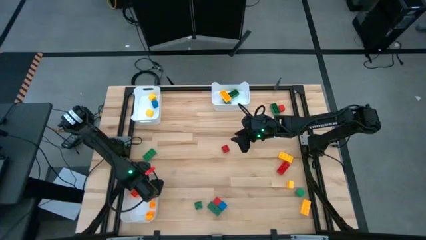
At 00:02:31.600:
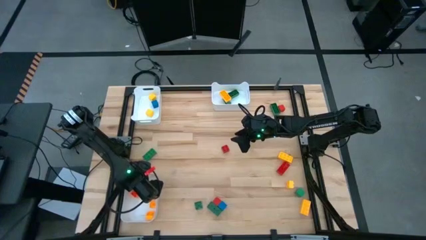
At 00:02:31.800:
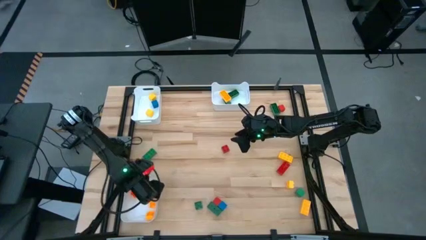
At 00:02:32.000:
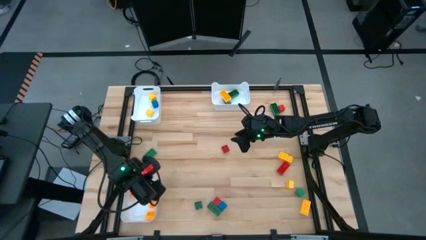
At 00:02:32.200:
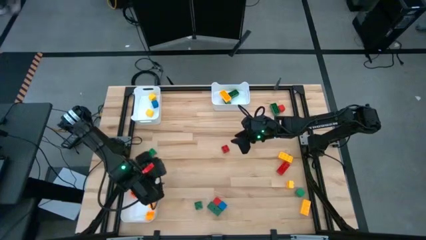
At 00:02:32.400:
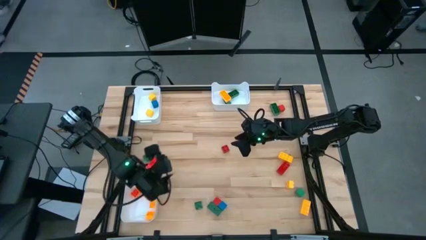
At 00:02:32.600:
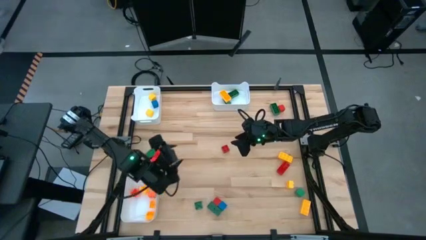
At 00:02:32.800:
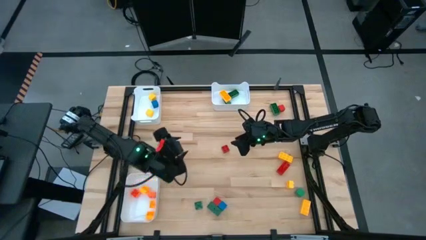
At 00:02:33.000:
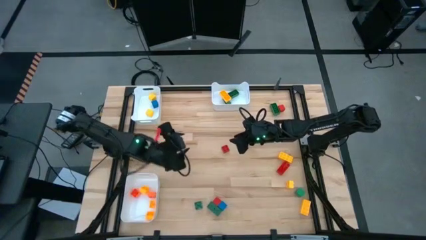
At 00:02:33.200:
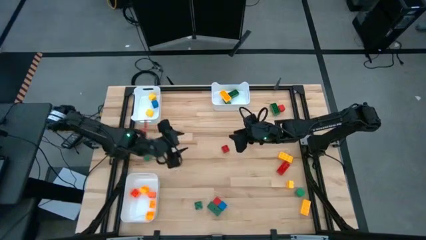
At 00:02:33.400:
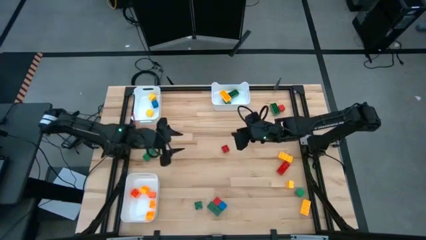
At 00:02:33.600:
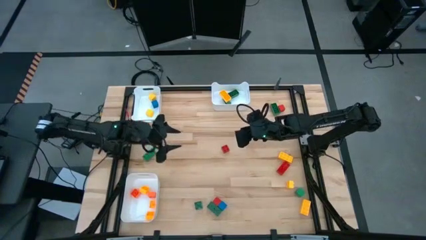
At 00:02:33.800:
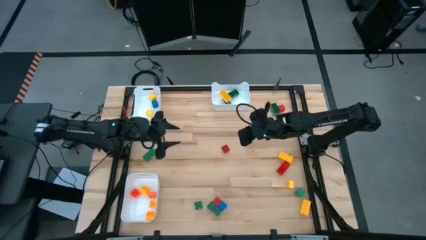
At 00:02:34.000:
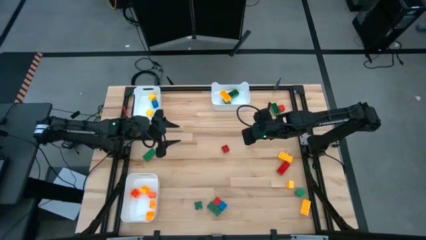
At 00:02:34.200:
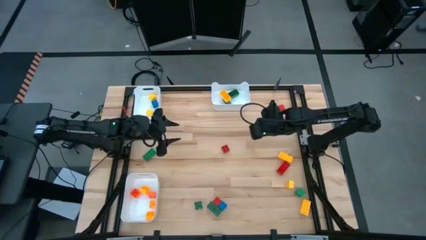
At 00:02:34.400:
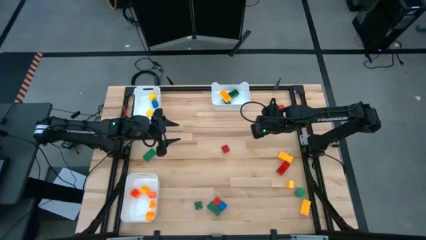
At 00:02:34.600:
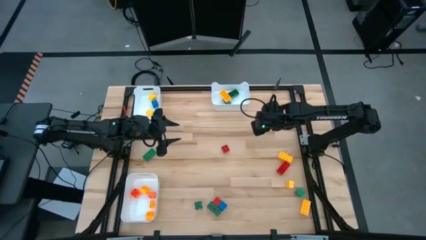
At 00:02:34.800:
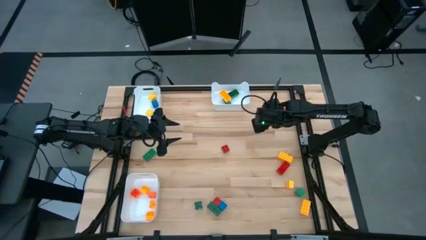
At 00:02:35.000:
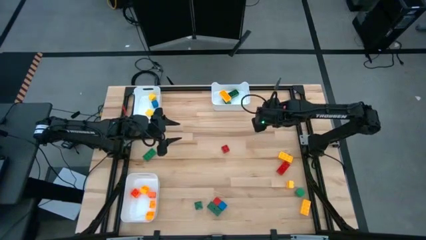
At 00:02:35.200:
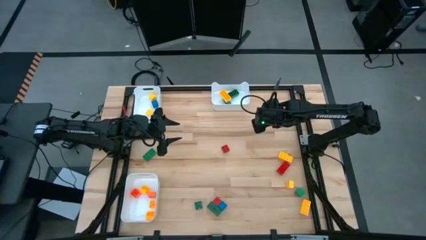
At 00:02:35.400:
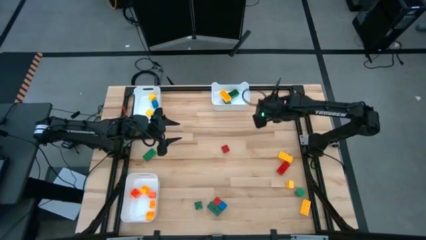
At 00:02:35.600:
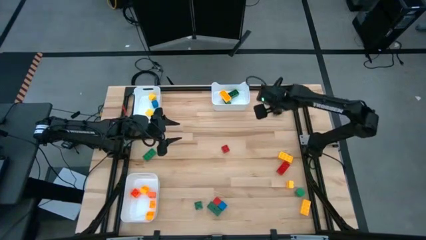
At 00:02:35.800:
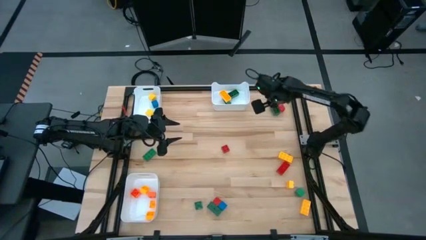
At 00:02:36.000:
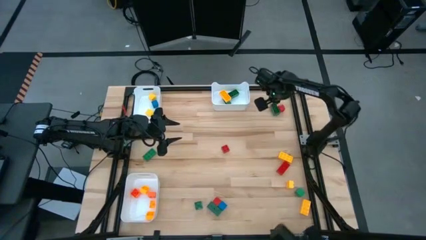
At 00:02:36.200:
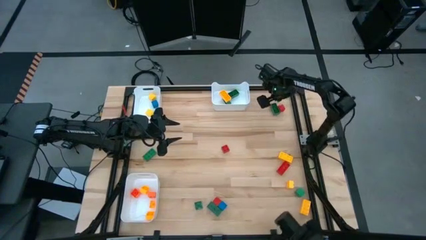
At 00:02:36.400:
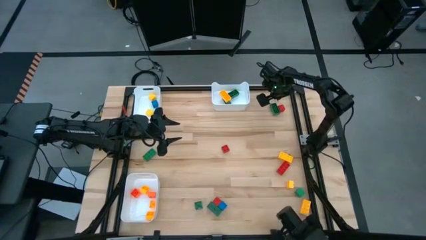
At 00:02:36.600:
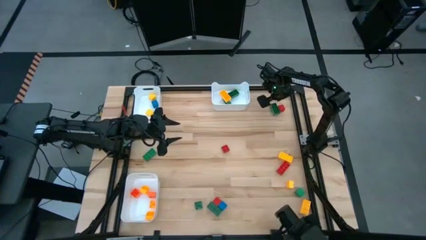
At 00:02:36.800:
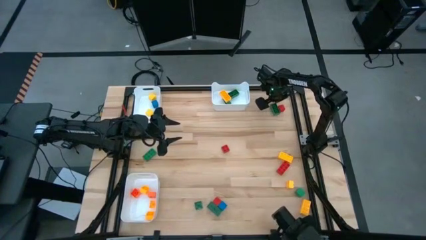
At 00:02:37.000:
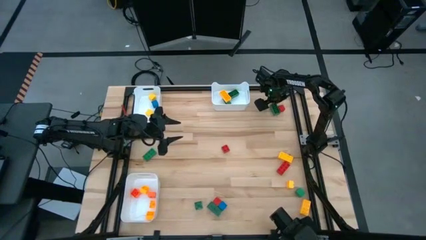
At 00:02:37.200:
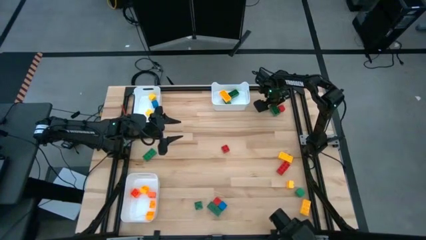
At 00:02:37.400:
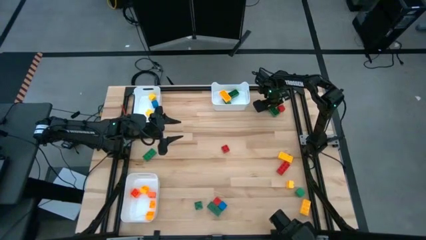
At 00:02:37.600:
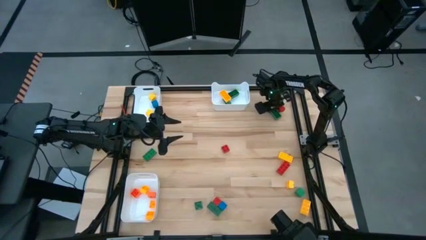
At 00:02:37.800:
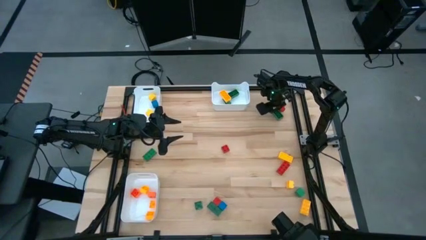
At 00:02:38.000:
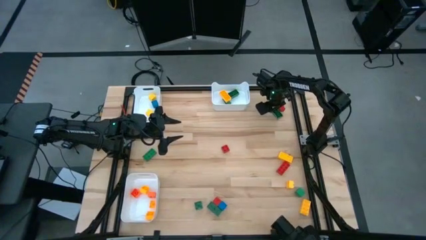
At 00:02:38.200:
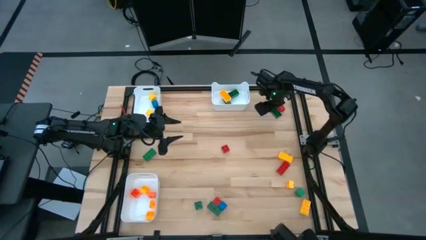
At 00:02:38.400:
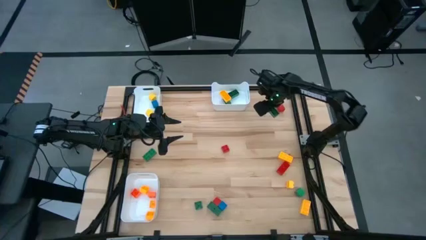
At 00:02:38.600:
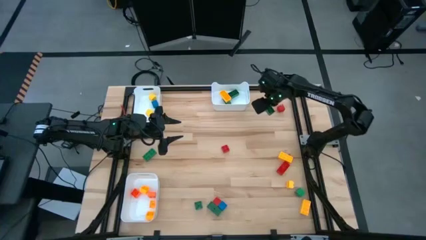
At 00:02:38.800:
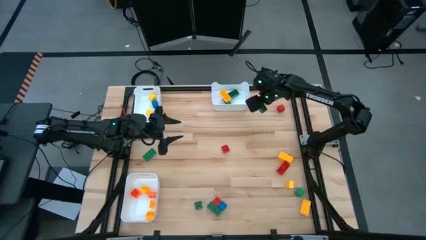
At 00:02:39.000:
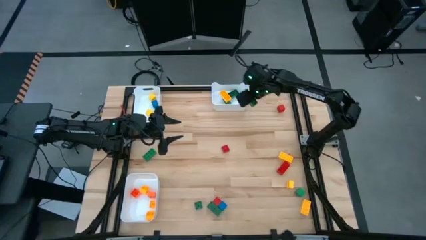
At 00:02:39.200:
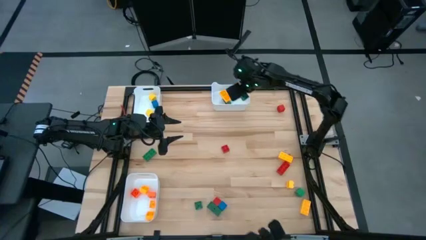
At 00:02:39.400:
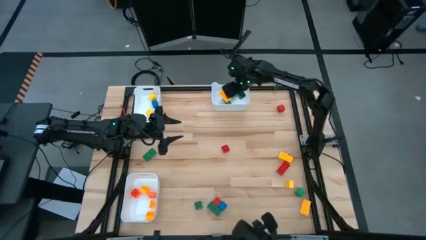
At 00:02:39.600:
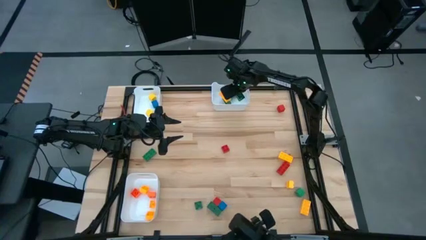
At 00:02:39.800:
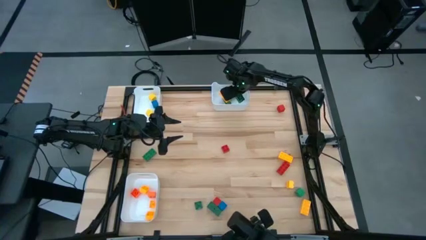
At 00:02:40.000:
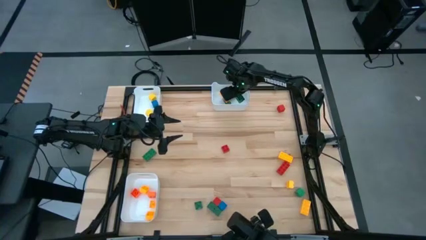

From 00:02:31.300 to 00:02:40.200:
Task: Sort blocks by size
Put the green 8 stud game piece into the top right white bin

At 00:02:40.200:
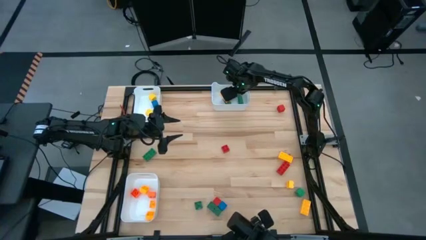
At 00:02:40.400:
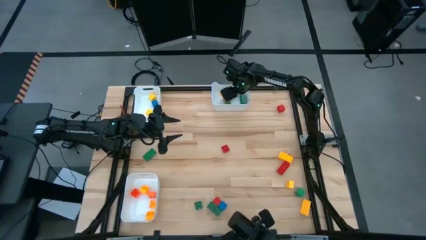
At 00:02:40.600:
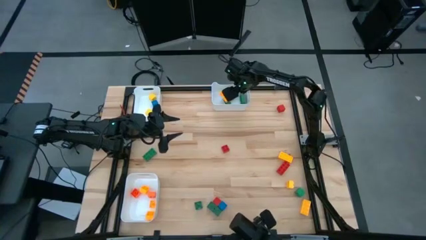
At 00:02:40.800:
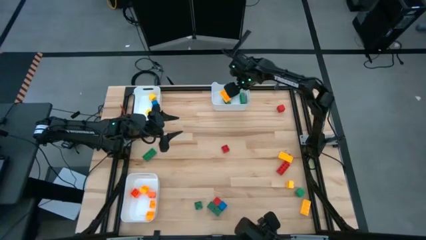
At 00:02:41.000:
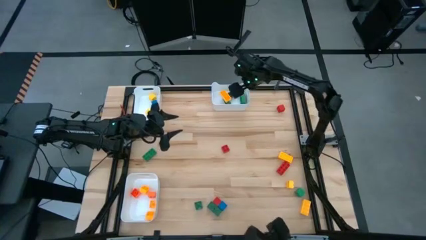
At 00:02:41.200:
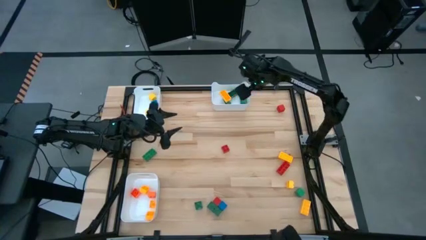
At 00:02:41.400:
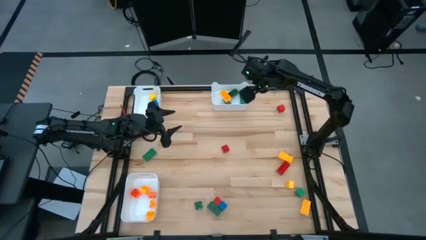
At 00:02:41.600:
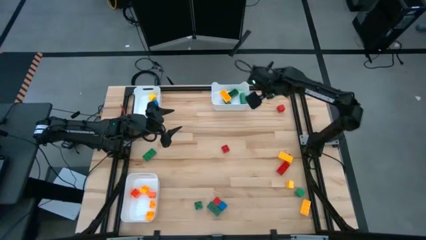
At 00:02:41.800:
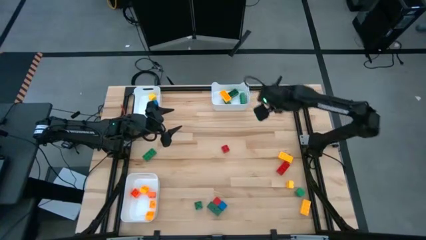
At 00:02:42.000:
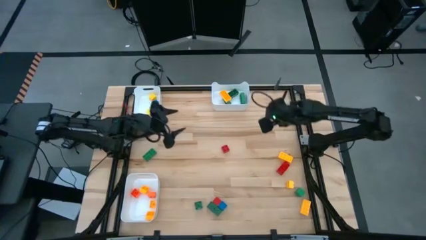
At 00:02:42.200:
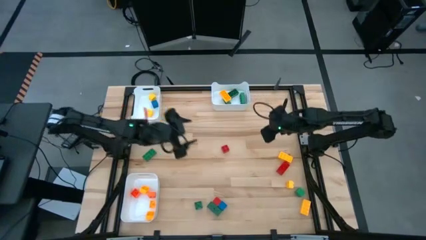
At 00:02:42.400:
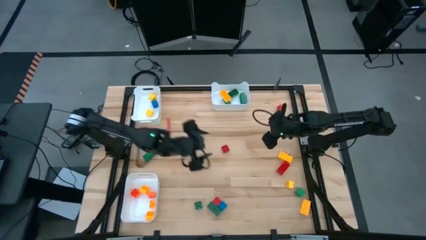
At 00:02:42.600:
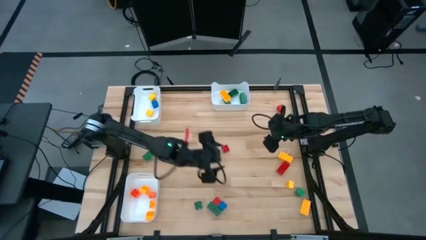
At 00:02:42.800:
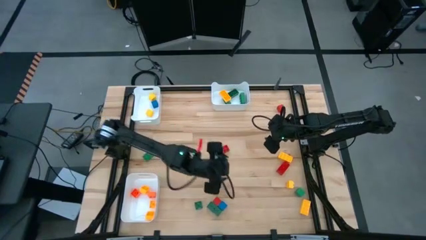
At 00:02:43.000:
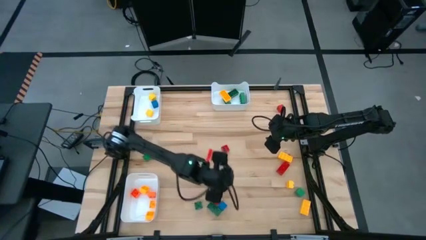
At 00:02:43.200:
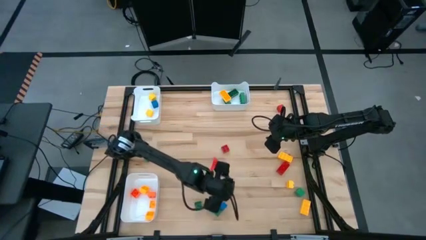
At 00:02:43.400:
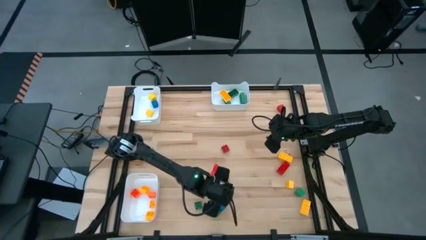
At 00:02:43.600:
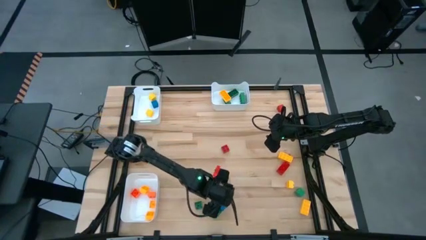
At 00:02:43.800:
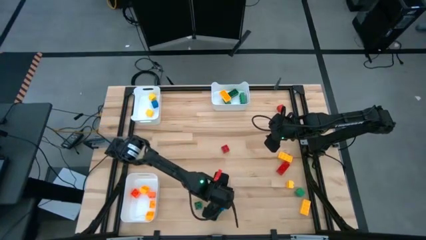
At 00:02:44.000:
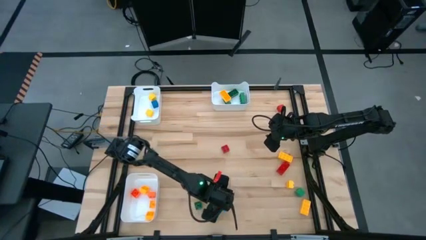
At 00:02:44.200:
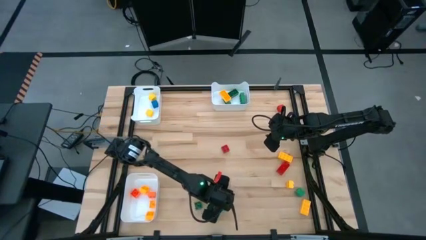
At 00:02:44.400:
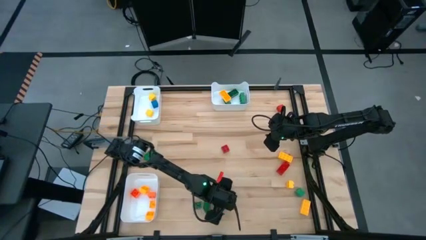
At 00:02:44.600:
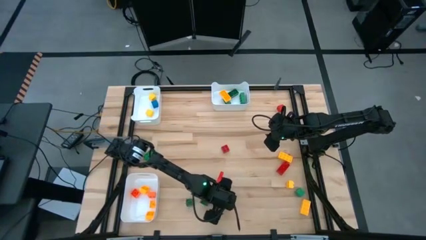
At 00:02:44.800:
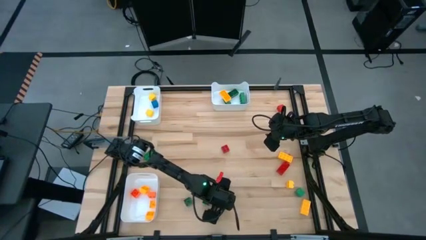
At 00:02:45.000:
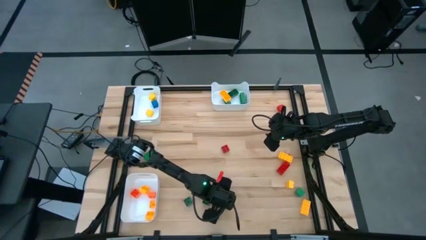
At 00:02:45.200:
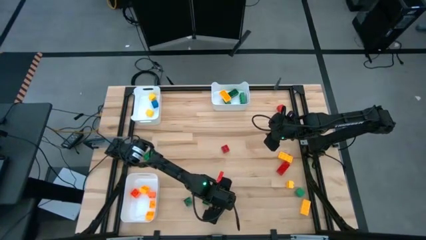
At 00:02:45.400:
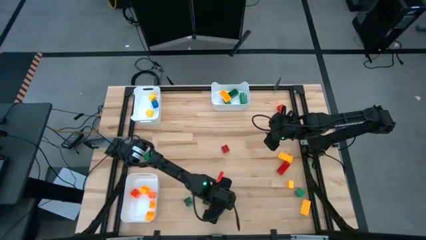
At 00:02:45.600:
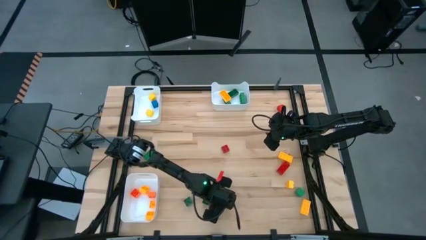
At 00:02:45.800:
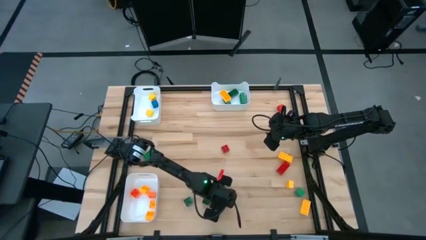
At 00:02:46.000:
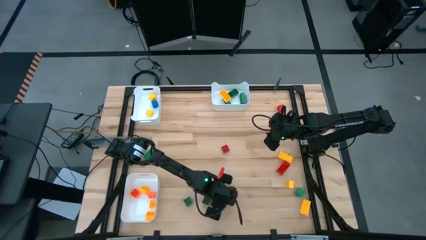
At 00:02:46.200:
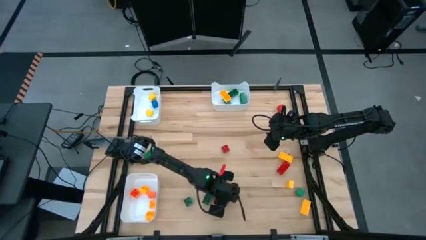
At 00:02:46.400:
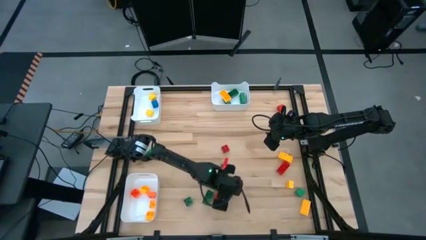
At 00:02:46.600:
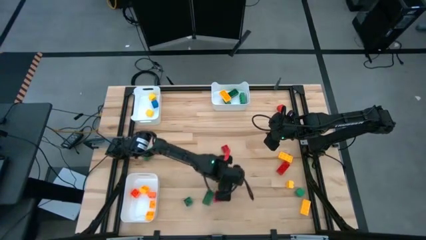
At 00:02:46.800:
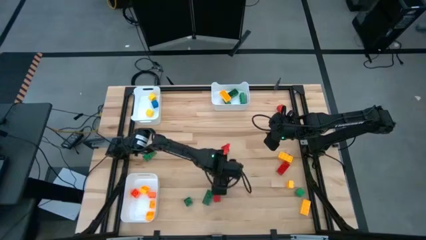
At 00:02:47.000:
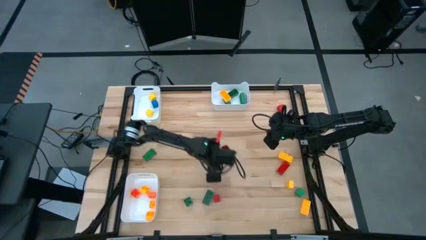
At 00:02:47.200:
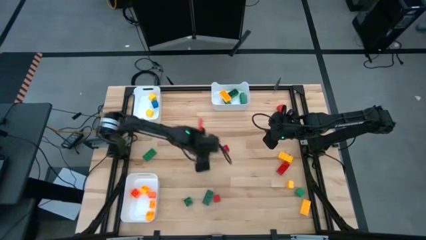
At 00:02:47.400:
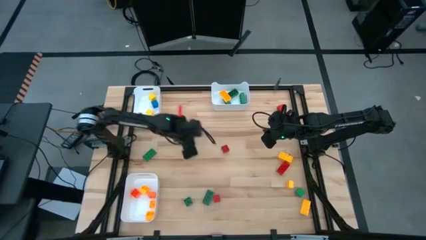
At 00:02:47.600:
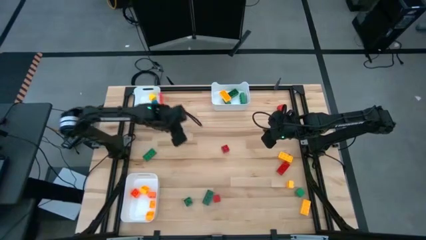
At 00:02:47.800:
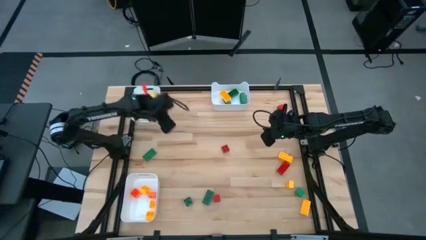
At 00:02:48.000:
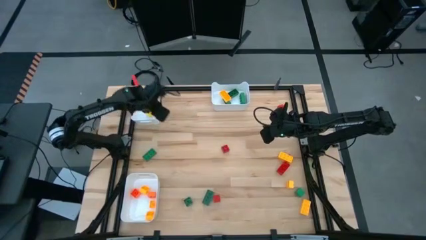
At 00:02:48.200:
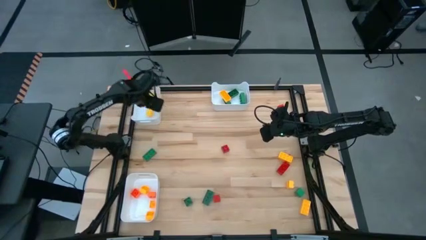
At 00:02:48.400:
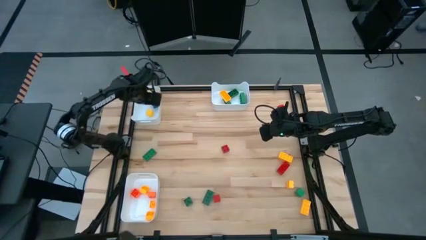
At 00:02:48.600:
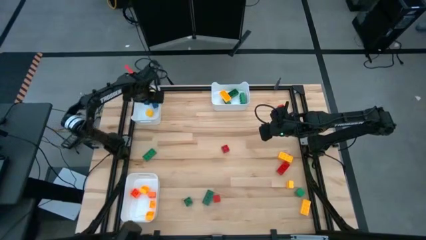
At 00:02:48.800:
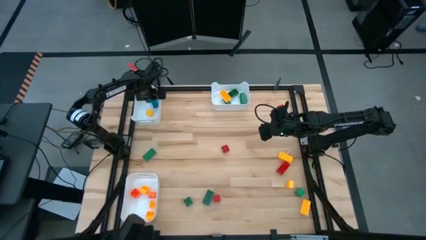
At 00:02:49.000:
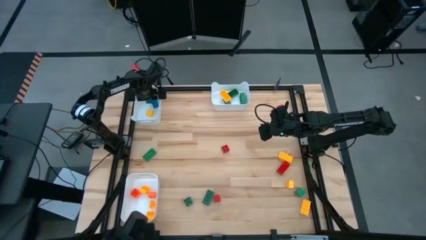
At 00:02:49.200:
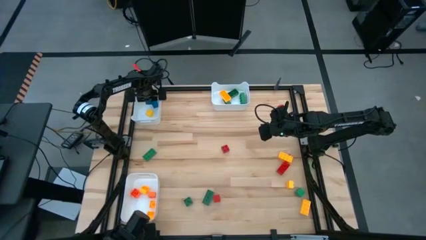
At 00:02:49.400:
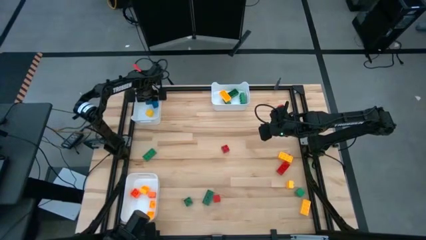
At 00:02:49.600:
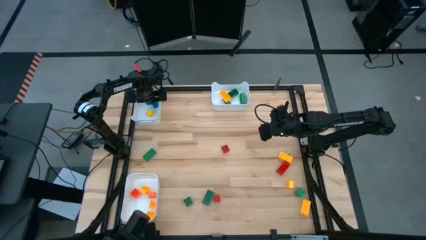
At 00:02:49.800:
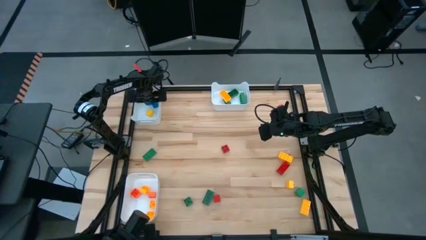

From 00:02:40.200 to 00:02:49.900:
Put the blue block into the top left white bin
